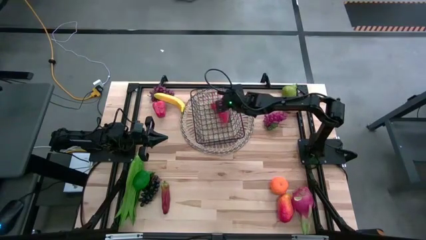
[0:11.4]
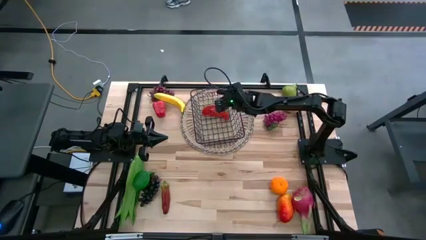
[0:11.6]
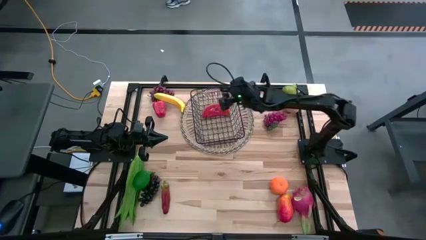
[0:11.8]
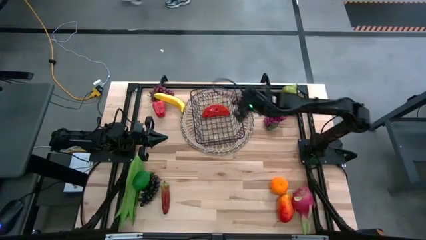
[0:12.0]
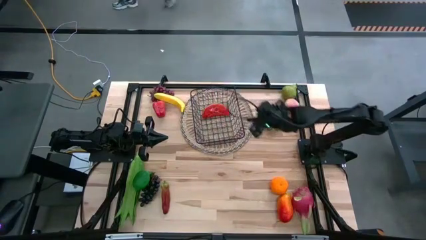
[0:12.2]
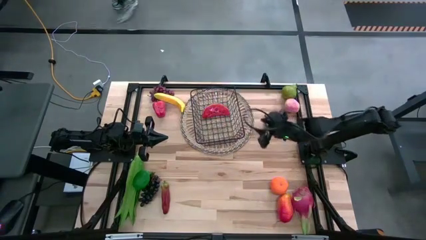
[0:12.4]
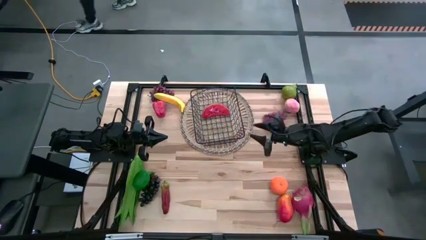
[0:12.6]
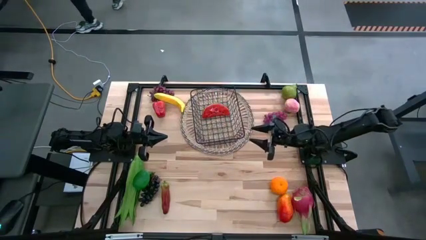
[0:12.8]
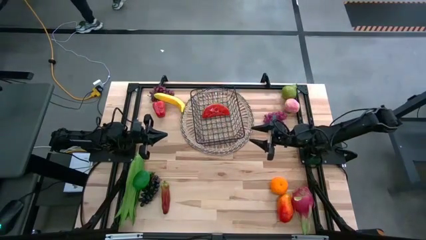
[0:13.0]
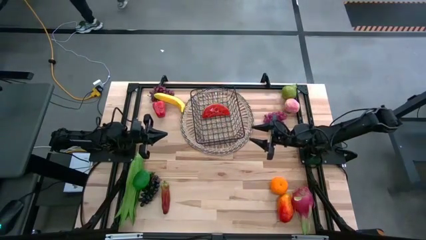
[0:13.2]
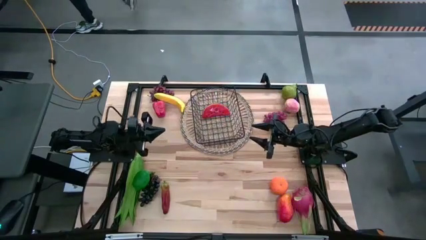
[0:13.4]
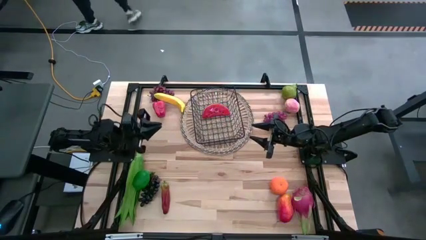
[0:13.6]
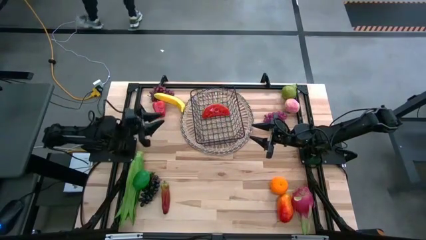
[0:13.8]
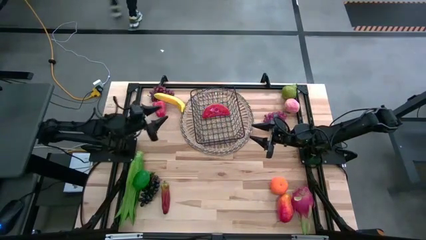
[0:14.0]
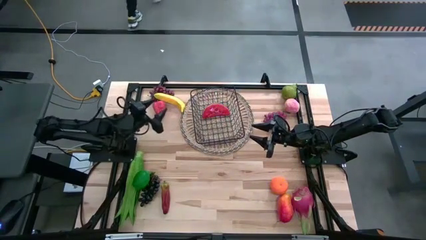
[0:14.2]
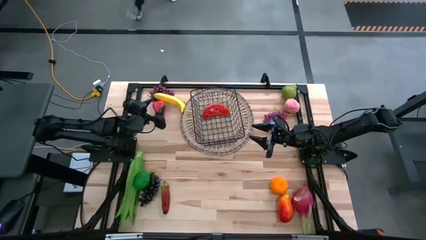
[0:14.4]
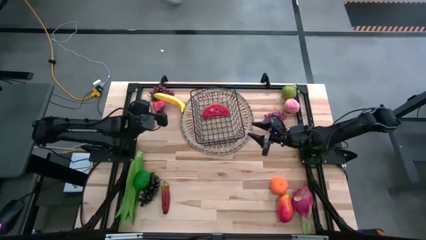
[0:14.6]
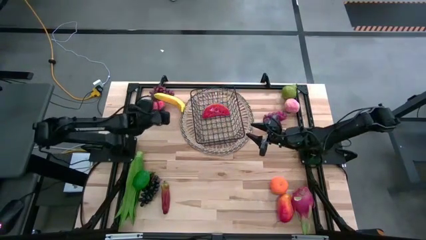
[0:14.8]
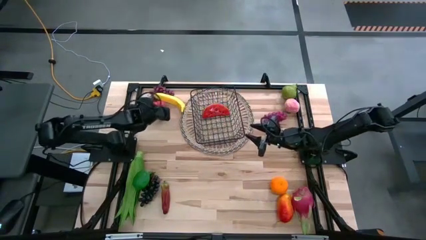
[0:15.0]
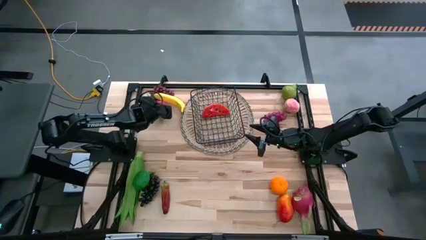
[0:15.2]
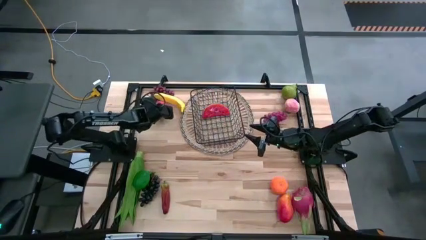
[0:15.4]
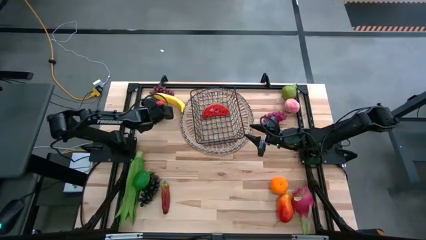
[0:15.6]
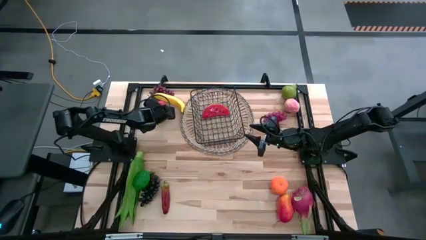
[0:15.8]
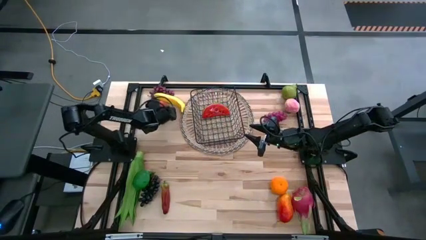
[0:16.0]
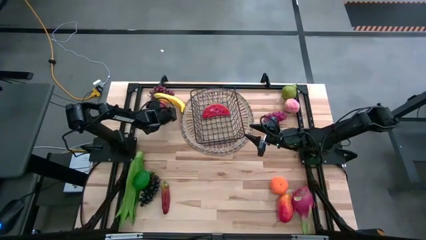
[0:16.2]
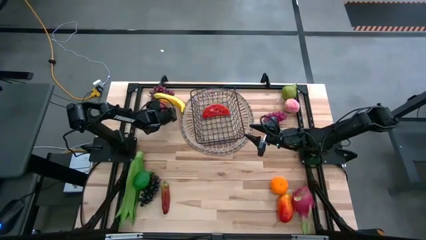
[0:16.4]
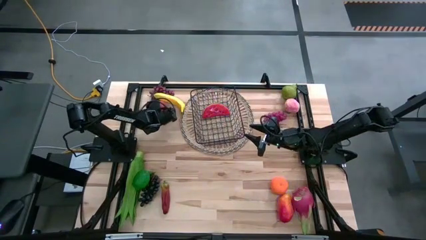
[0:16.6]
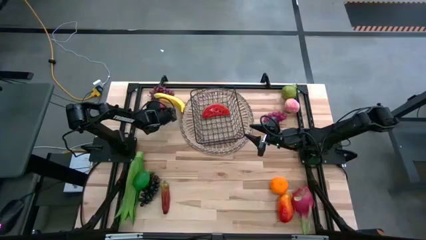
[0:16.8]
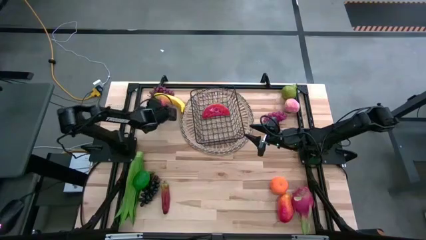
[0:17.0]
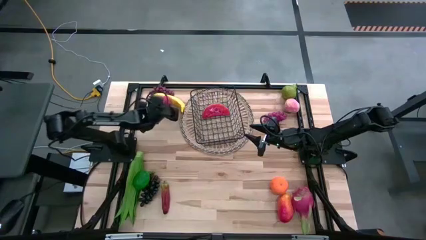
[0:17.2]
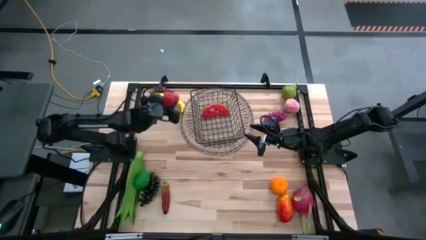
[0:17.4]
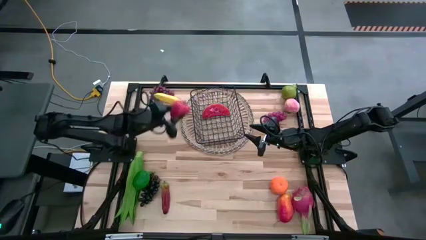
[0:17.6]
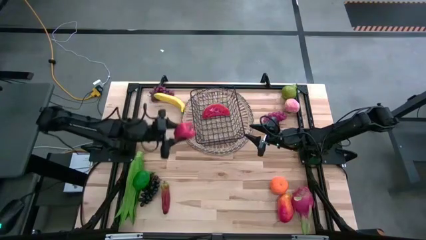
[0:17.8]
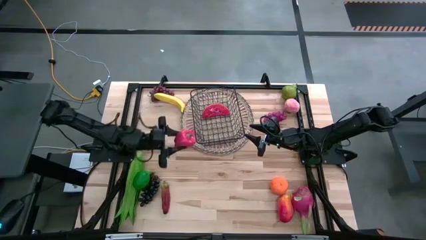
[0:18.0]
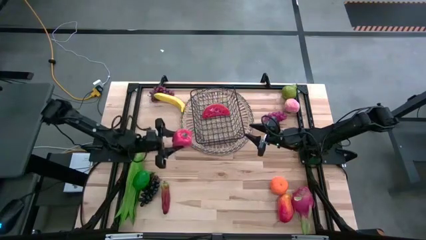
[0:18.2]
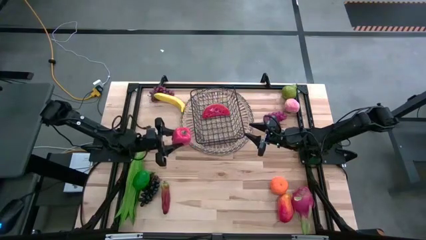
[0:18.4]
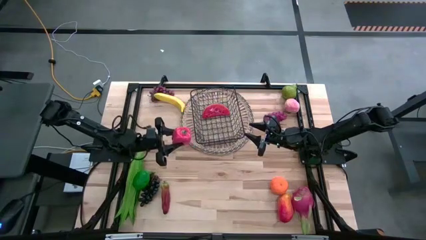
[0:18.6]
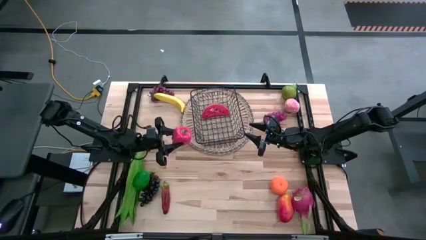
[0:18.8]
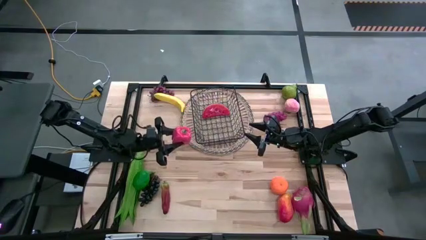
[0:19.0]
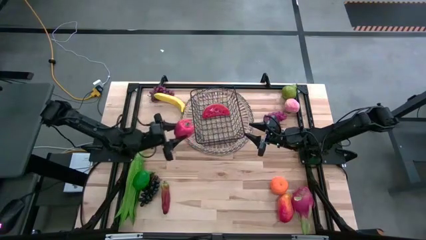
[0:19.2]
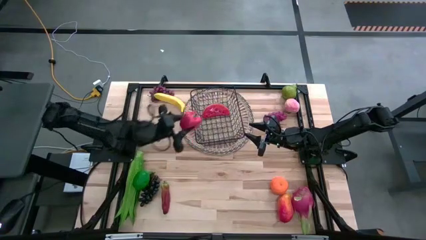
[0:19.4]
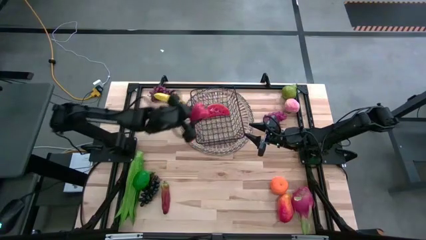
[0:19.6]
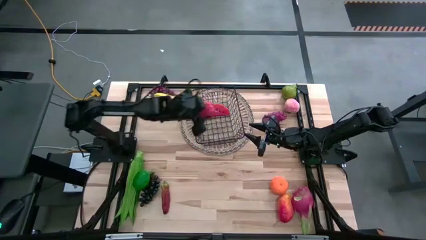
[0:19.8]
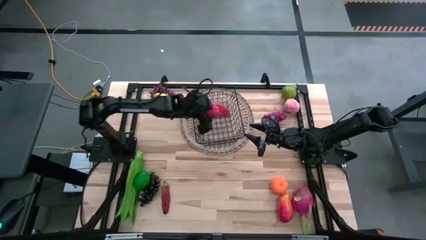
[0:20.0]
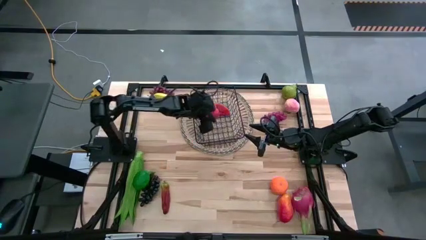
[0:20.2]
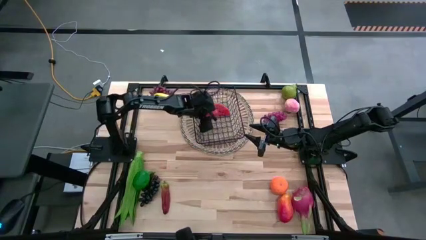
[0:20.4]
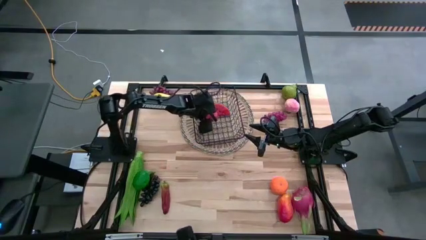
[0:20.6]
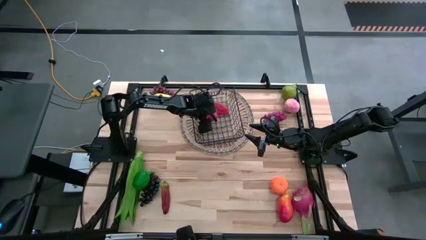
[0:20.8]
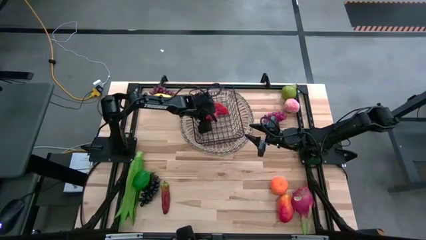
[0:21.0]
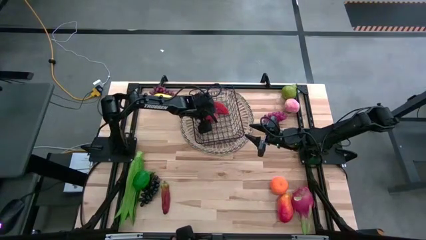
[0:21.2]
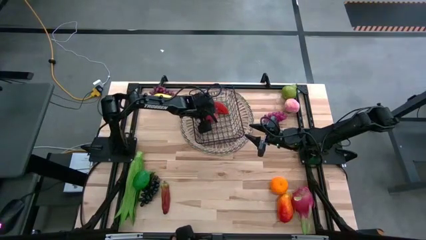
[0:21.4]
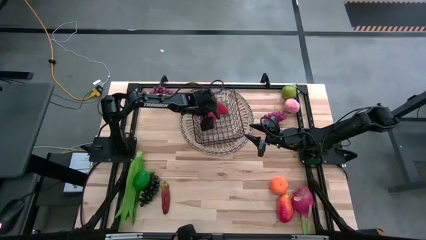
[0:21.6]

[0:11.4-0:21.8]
Task: Build produce basket
Put the red bell pepper into the black wire basket
